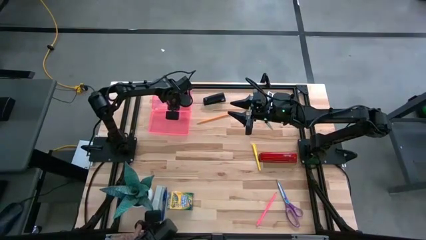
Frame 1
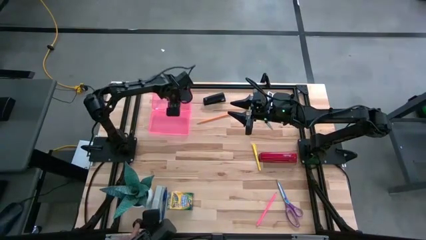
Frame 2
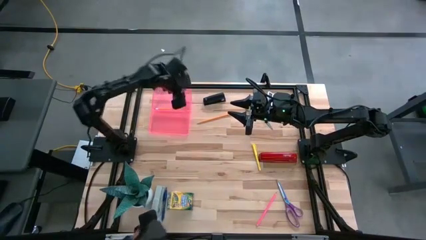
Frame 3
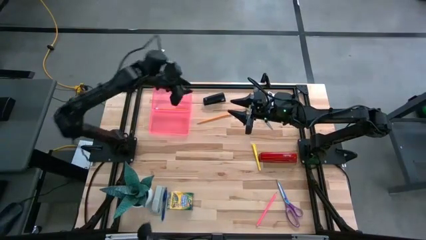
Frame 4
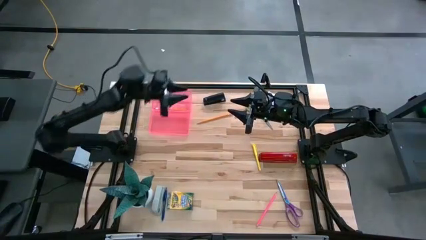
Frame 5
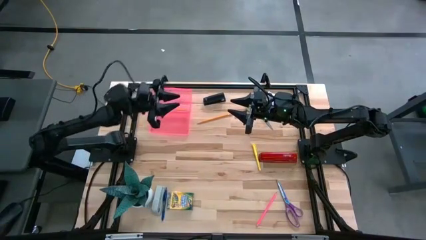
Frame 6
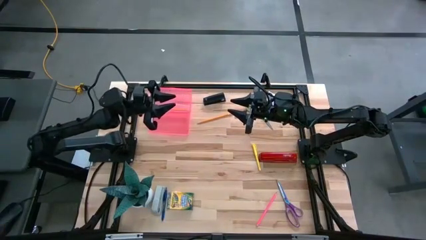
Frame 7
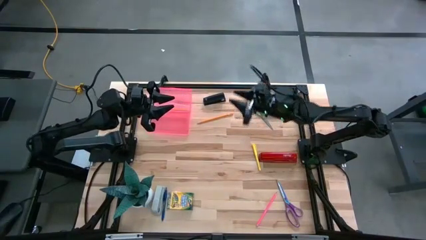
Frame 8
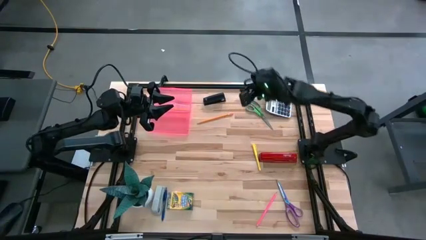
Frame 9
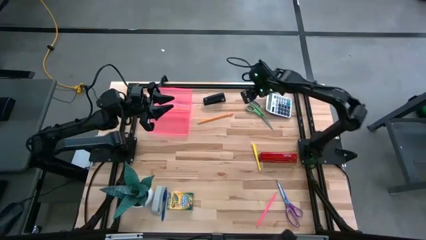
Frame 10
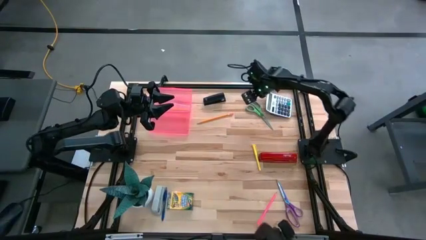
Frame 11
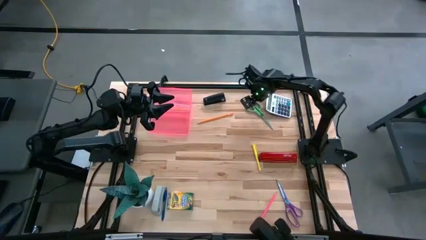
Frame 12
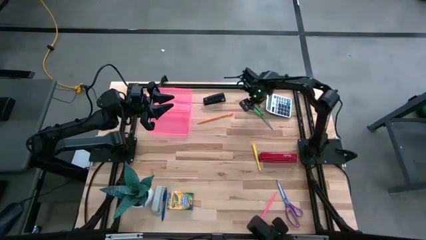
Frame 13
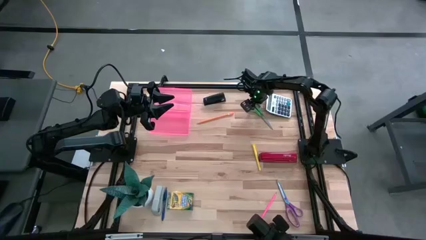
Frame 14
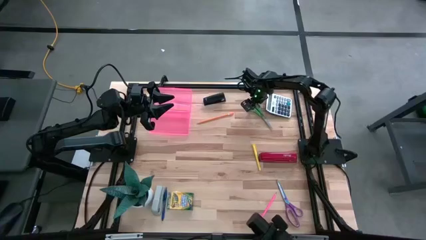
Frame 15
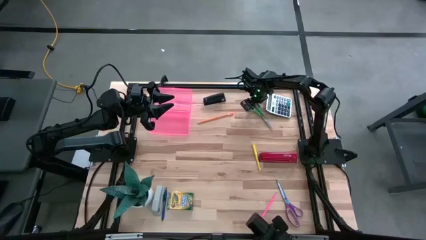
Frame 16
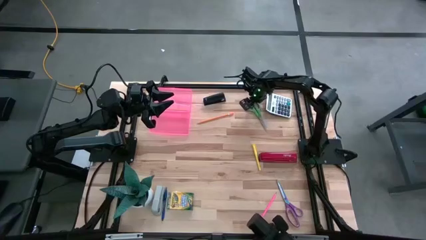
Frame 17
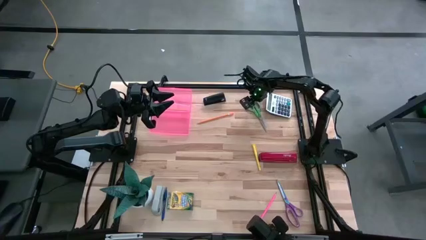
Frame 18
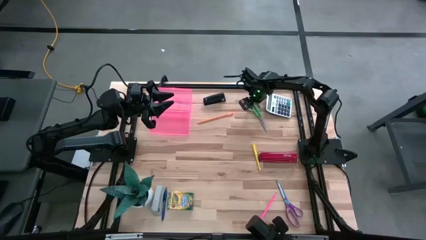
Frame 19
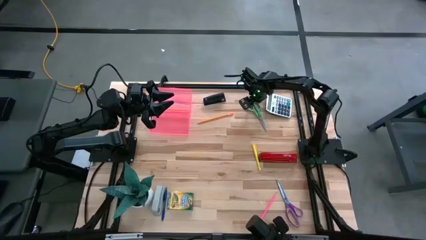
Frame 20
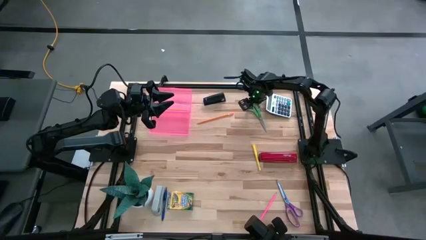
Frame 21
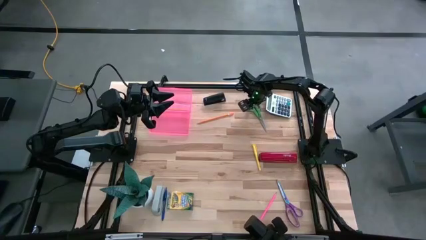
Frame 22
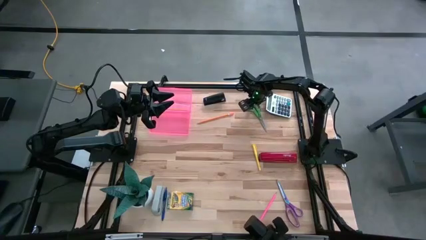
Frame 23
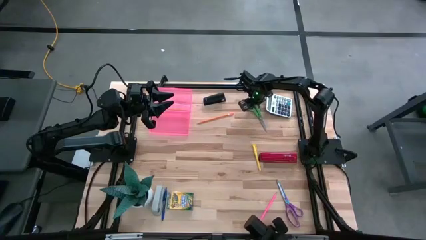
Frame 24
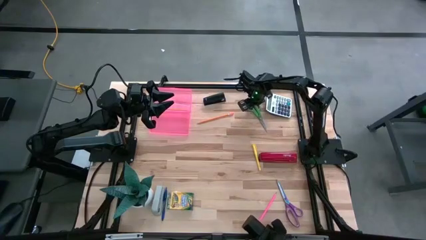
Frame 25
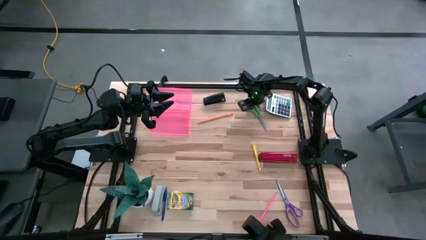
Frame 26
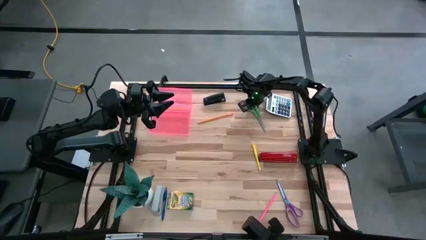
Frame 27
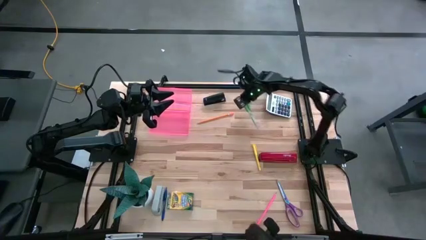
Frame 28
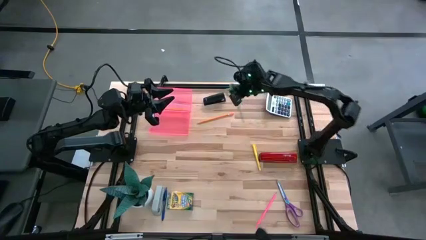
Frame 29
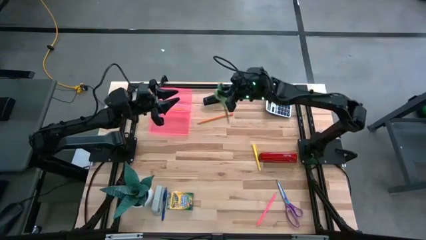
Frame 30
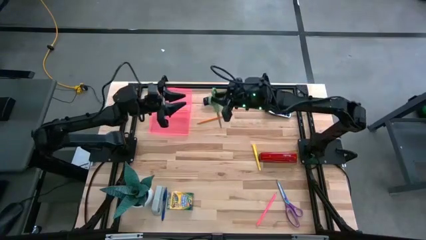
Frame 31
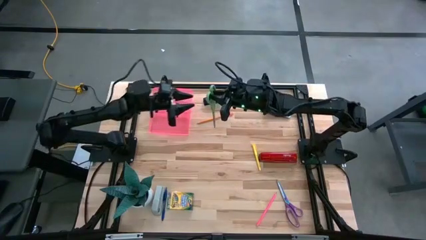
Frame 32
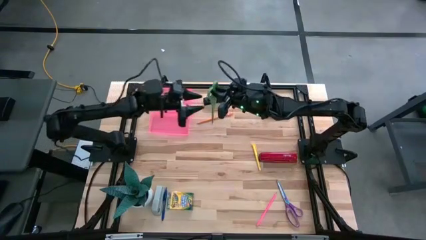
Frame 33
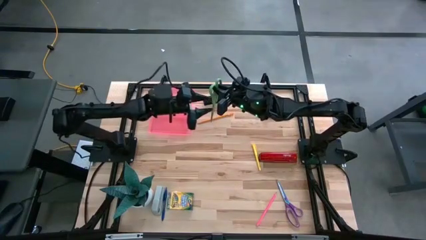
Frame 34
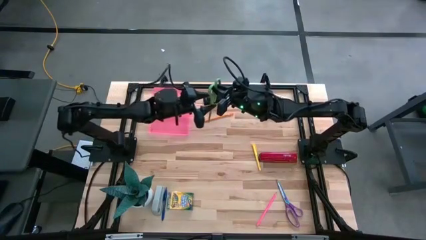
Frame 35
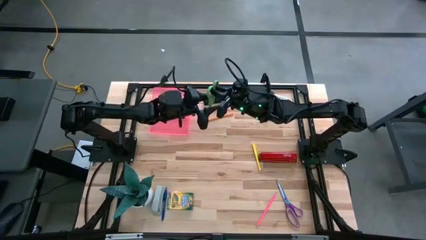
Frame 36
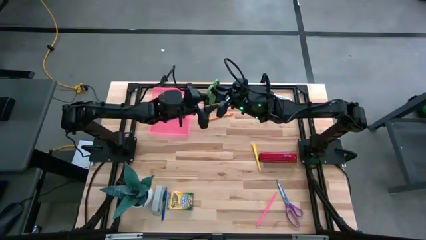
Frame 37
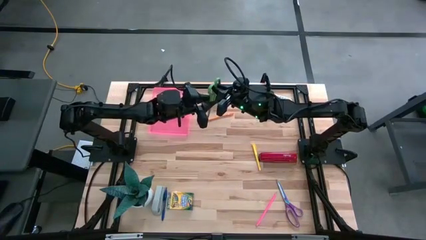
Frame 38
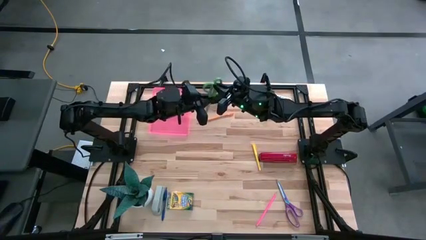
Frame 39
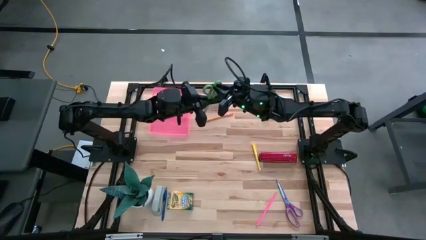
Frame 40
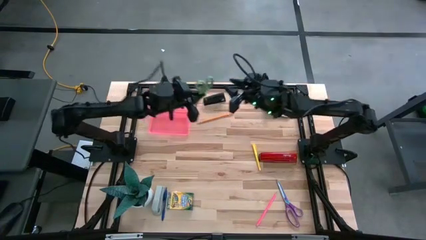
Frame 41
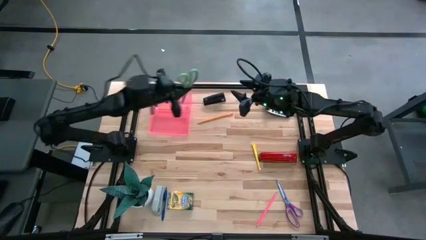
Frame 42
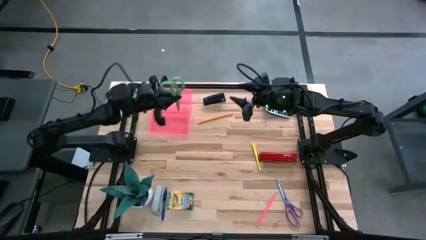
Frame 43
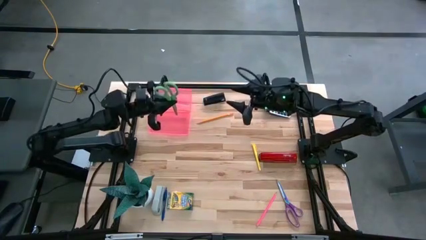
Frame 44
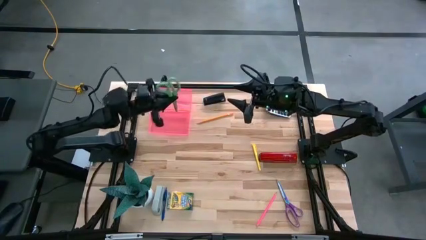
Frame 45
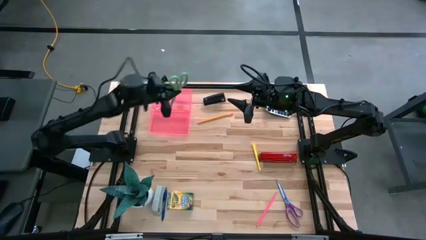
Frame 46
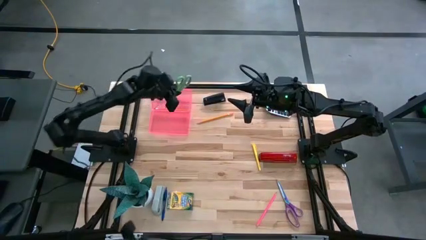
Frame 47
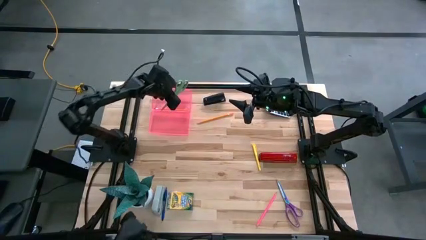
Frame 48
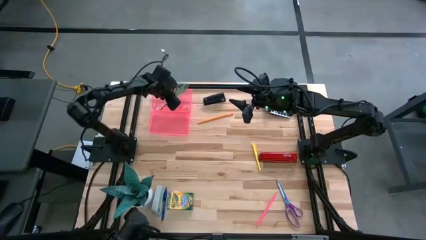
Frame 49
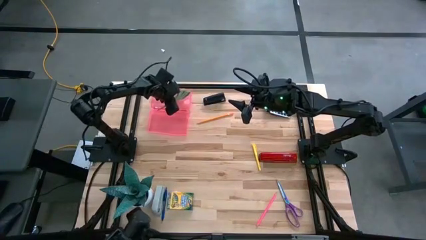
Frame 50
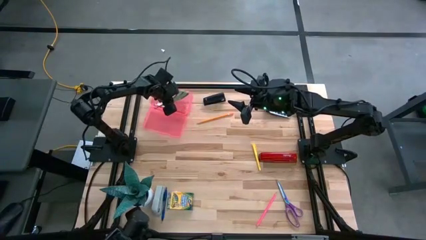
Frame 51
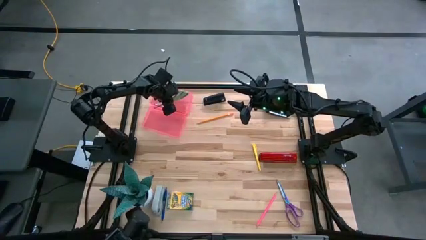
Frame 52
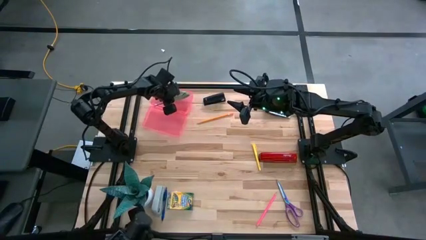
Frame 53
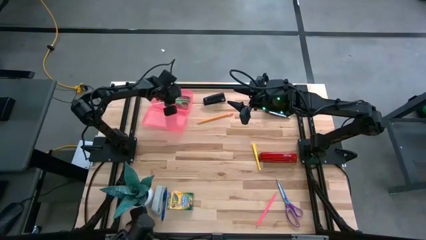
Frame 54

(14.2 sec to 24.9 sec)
Task: Pack school essentials
Put the green scissor into the pink supply box
